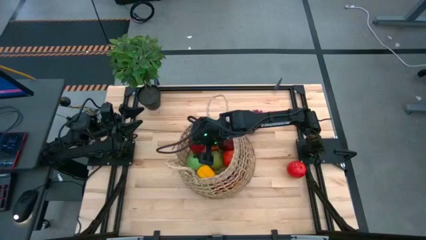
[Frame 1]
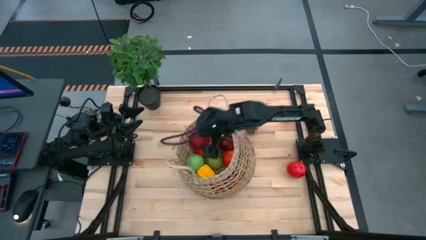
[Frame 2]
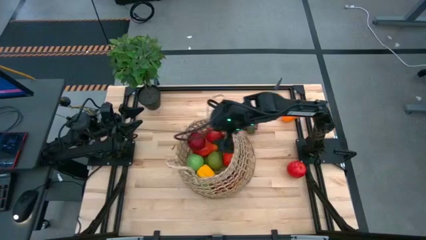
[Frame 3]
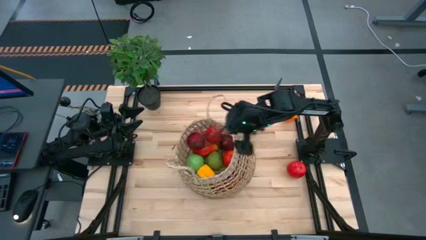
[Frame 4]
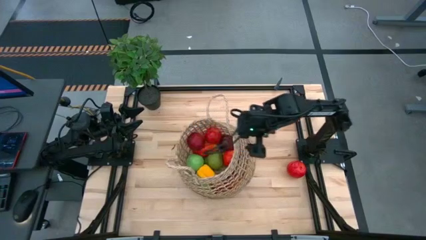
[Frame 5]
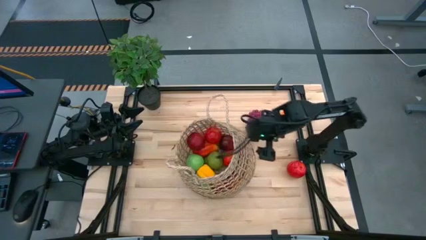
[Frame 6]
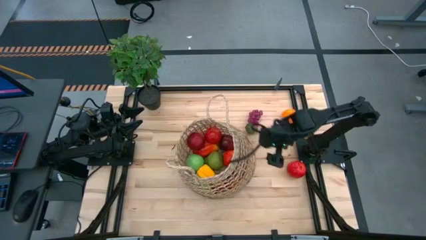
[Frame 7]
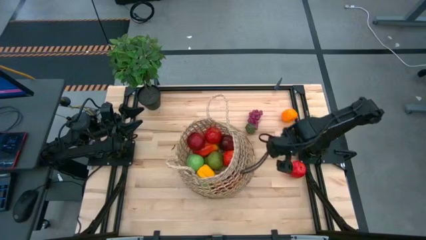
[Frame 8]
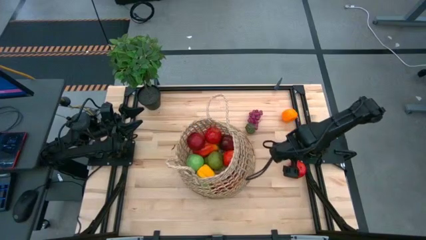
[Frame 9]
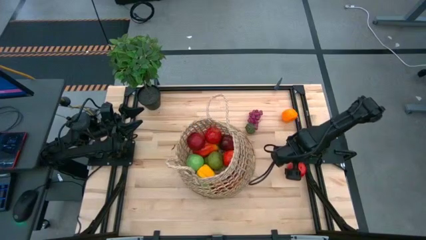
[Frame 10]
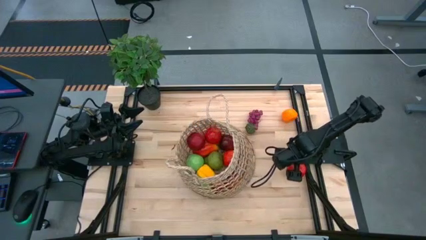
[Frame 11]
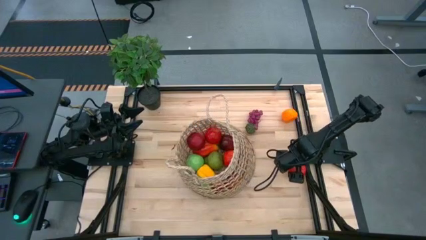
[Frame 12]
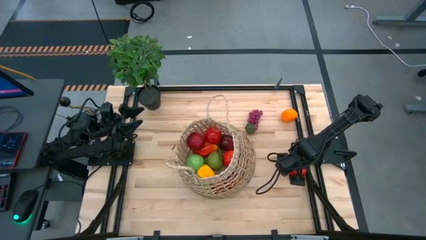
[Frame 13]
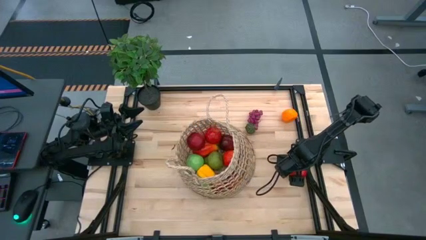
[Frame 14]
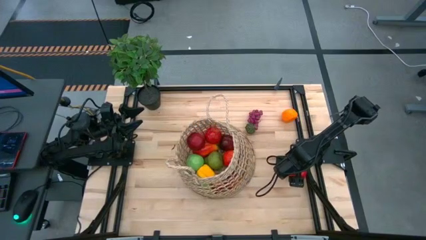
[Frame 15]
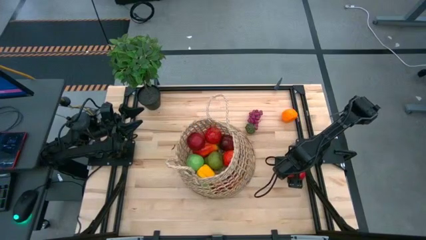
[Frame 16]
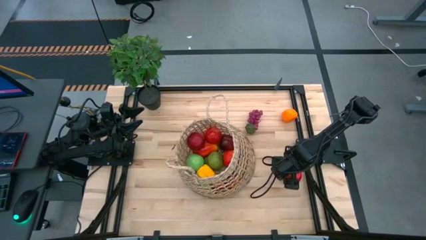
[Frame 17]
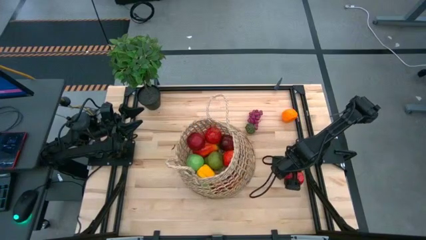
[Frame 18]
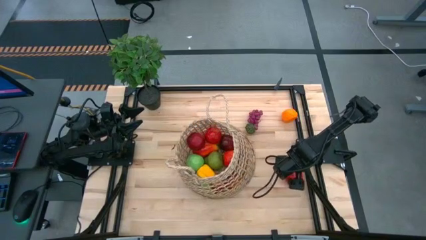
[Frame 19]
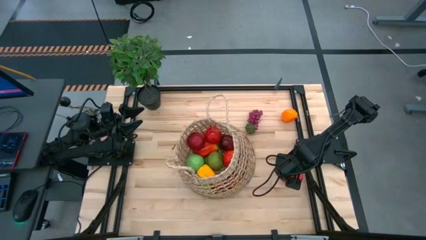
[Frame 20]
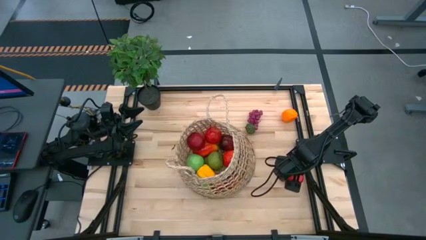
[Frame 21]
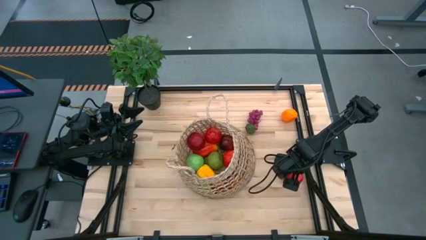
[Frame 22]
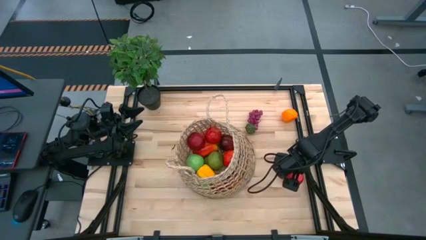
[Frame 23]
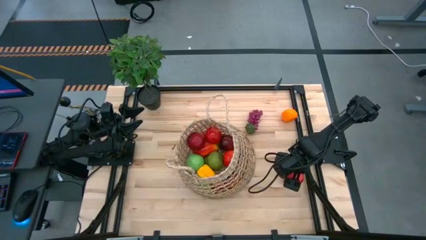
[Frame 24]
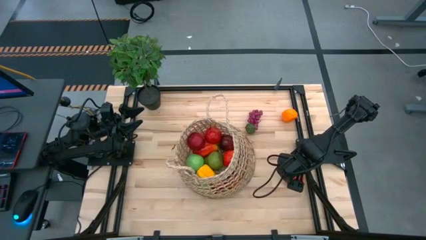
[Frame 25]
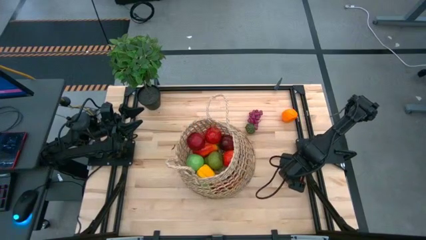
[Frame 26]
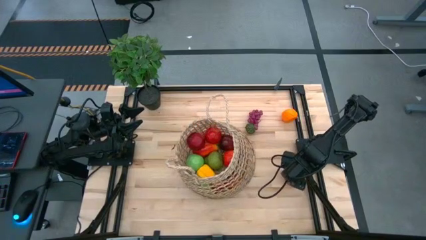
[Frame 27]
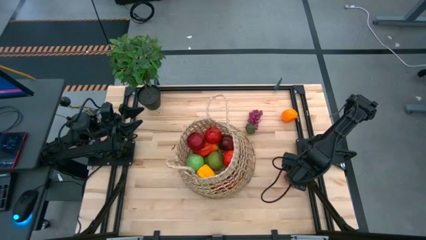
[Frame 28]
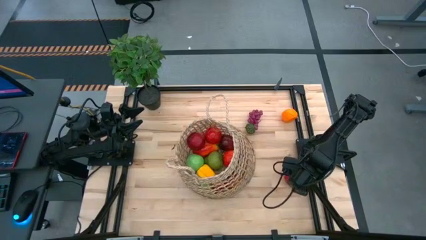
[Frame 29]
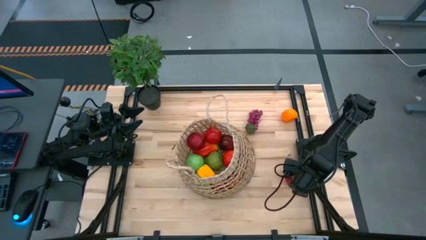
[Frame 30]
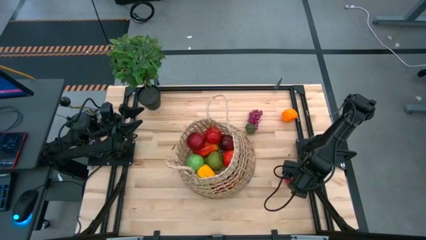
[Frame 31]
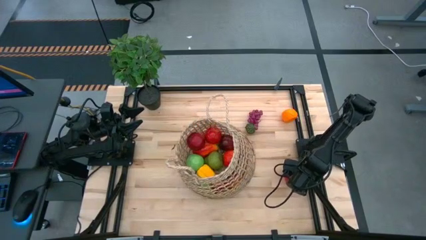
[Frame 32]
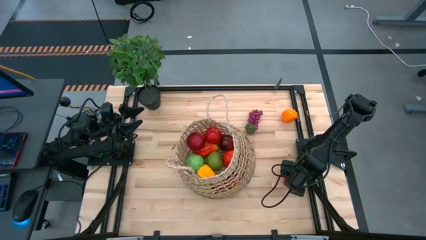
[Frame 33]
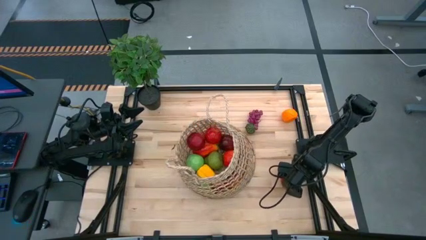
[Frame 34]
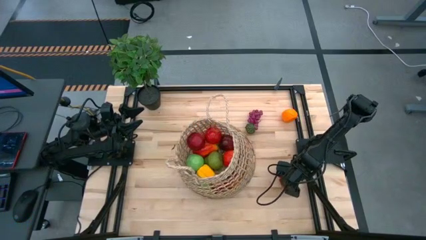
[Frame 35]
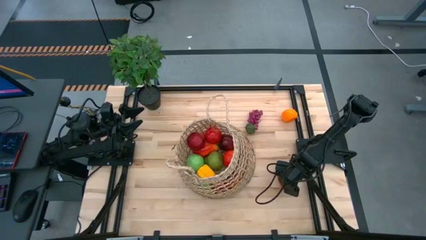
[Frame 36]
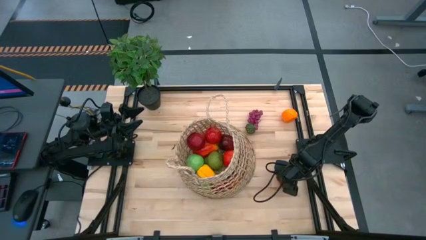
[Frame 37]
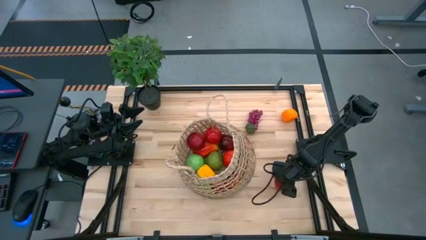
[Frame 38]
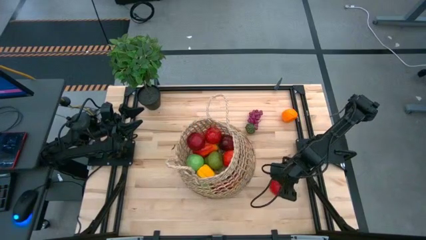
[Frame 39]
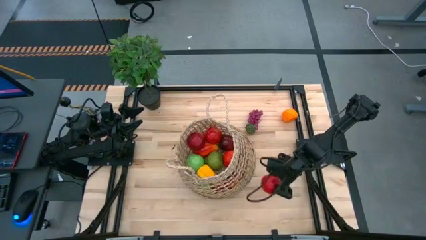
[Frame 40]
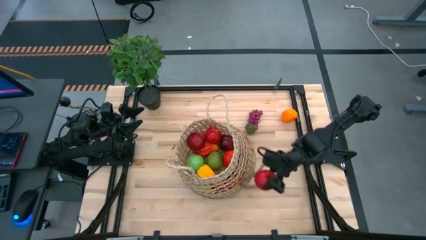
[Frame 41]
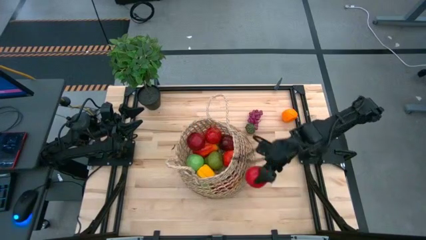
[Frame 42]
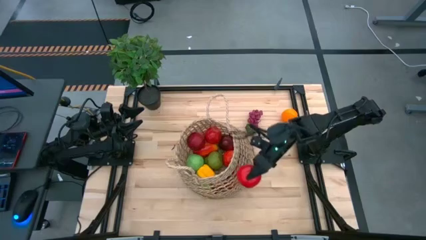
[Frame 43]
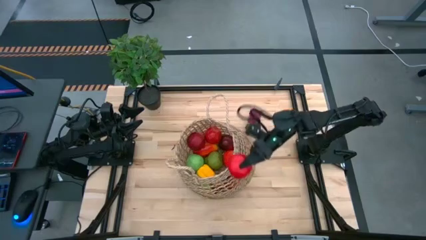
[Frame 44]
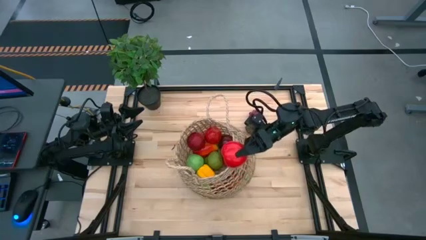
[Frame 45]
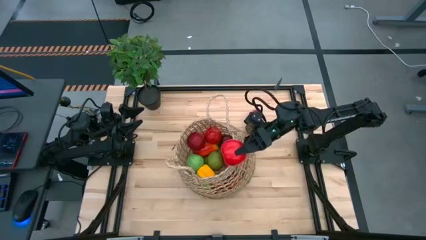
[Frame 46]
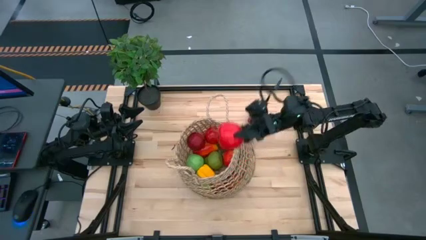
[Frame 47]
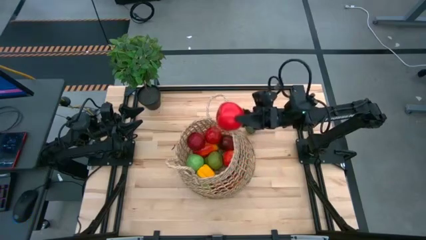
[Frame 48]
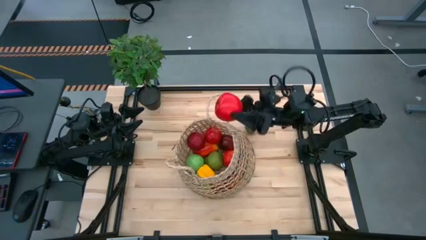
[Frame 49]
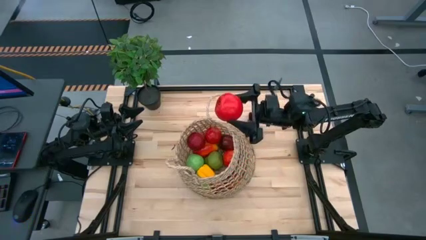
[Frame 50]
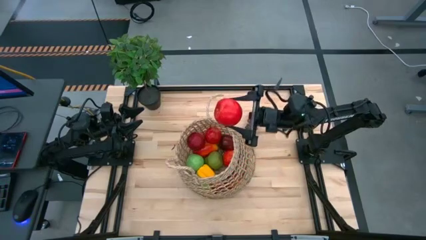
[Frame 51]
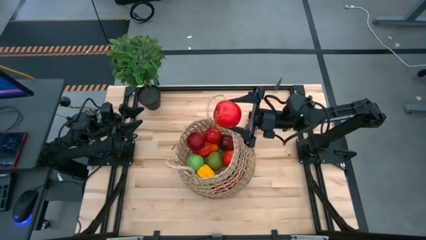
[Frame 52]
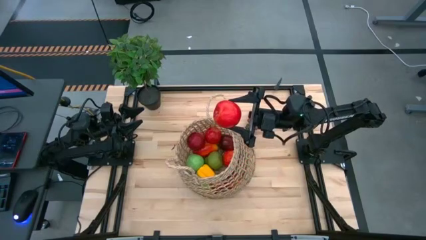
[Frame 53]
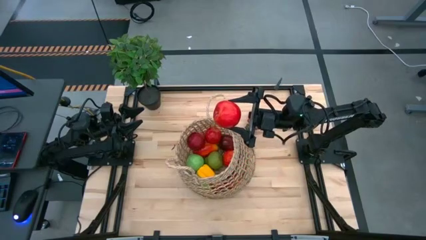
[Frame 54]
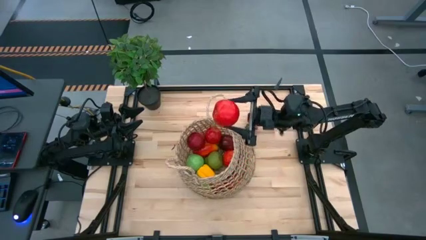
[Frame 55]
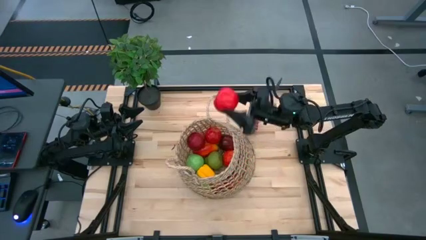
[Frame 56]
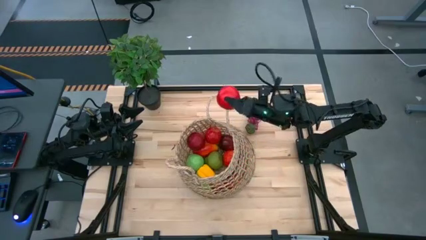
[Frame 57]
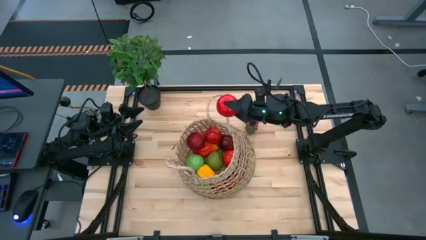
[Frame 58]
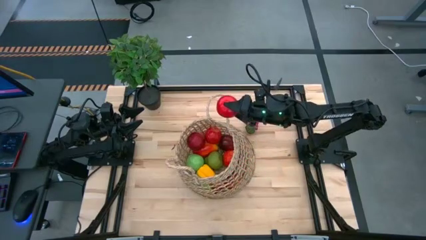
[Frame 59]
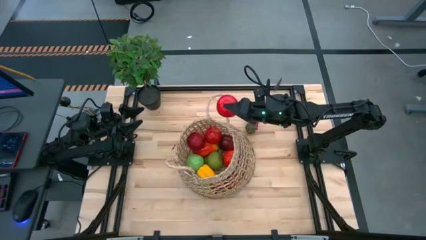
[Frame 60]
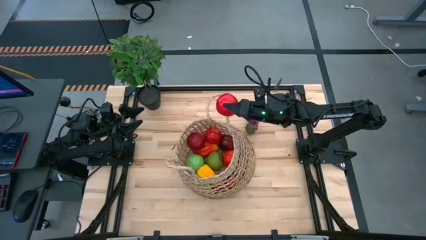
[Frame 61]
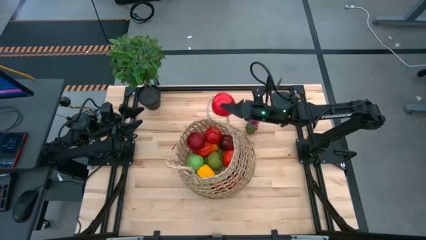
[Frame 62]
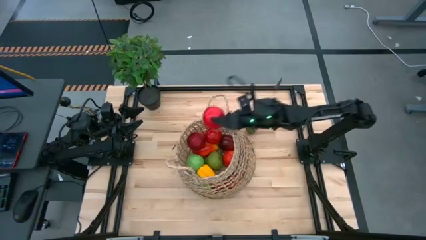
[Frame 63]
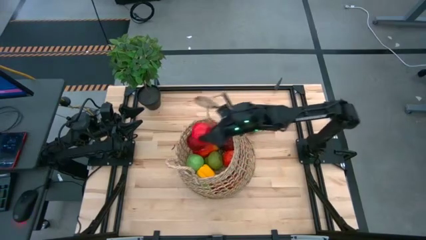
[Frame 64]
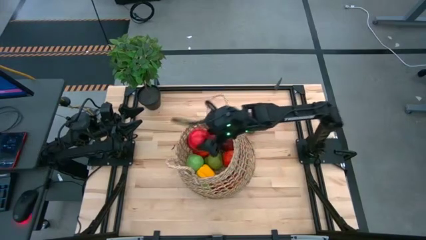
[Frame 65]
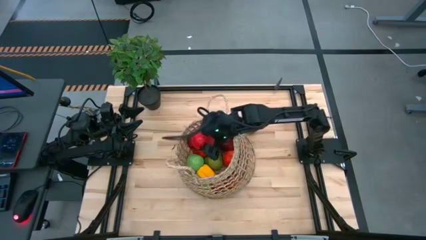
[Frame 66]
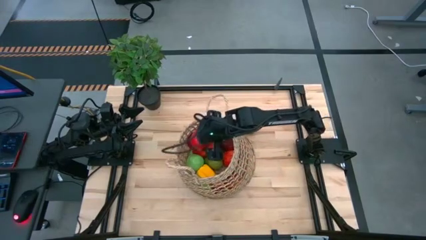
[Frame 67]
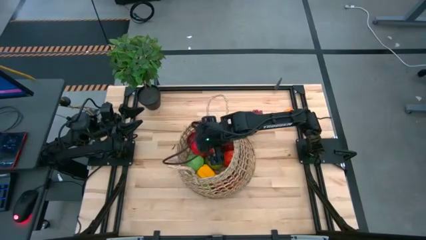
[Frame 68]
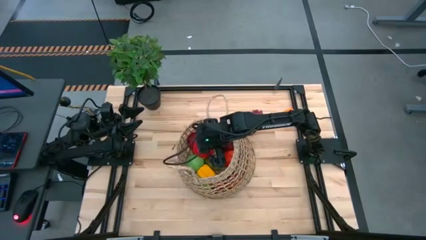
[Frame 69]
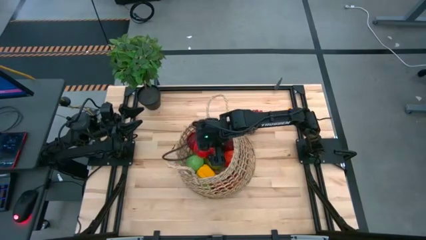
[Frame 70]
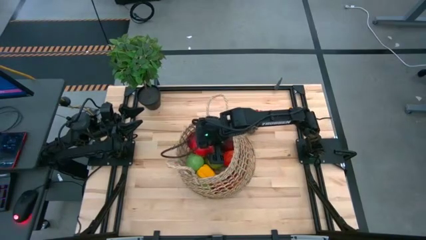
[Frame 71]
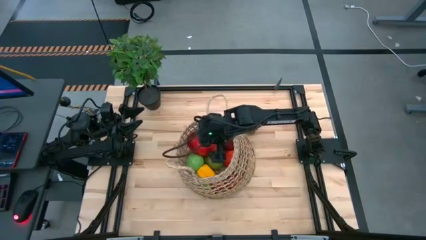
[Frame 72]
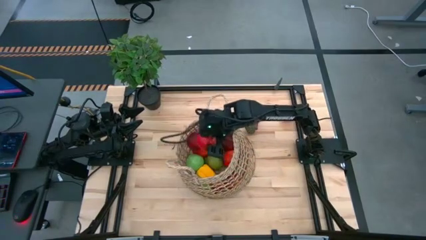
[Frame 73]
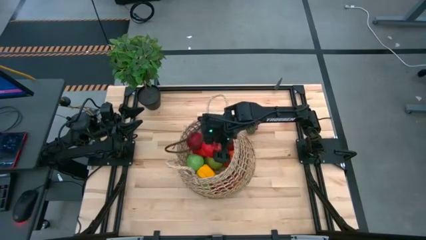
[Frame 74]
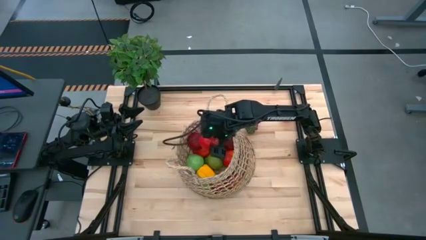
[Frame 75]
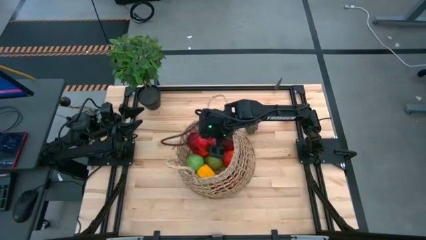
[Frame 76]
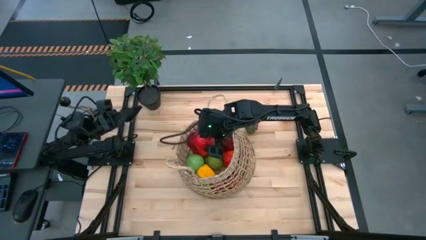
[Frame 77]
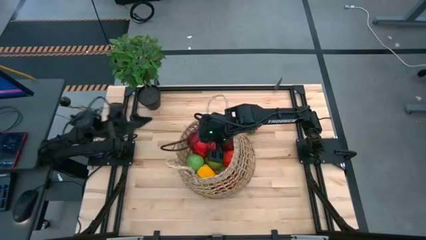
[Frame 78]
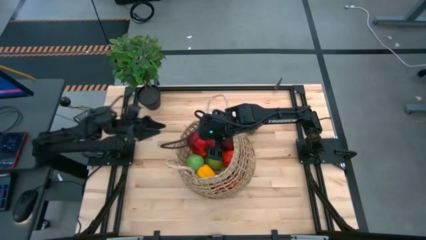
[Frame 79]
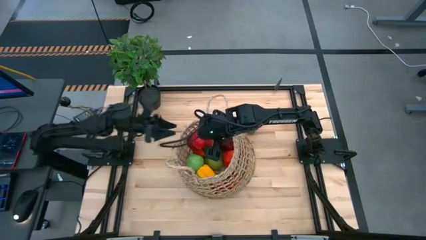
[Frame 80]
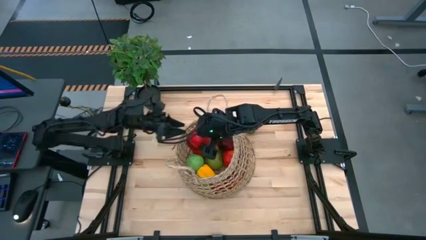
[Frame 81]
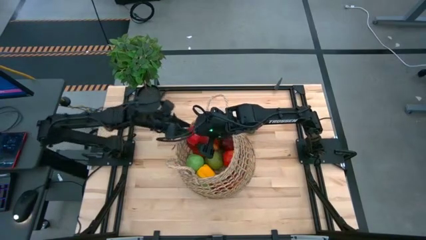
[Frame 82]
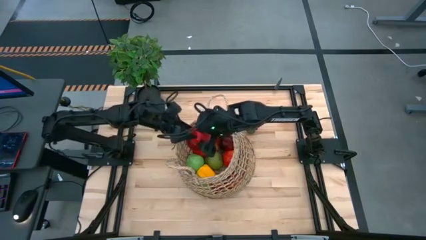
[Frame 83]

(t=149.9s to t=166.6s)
Task: Build produce basket
Put the red apple into the brown basket
